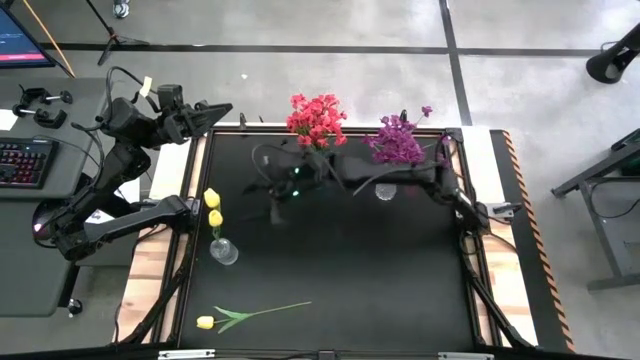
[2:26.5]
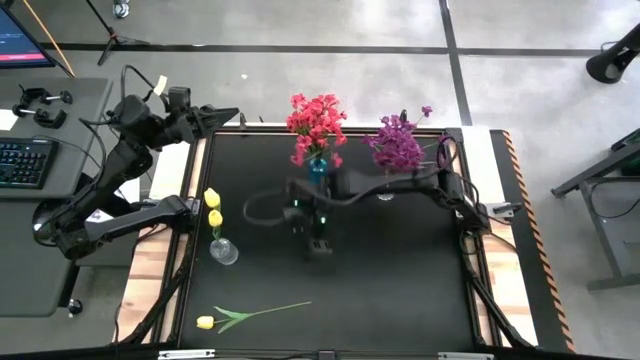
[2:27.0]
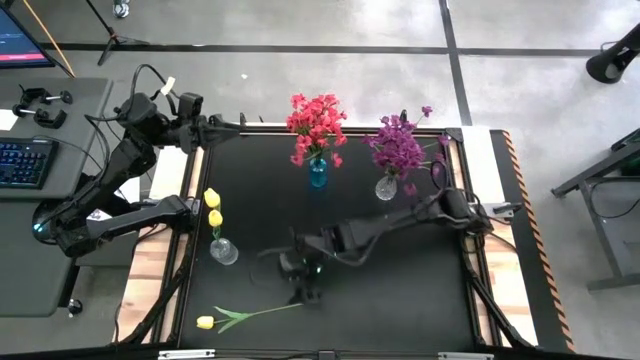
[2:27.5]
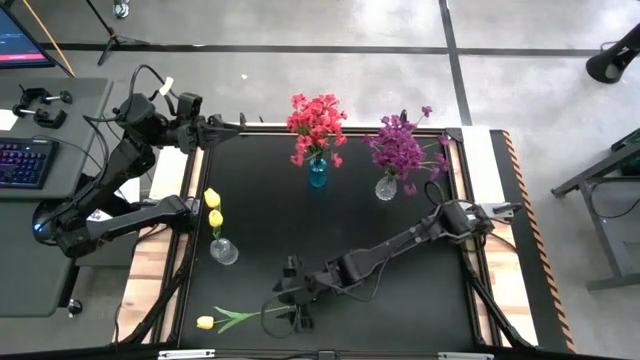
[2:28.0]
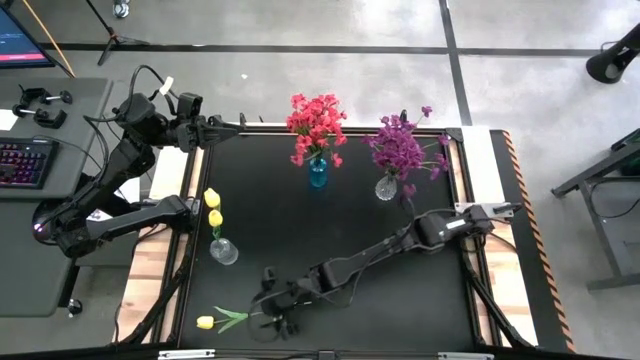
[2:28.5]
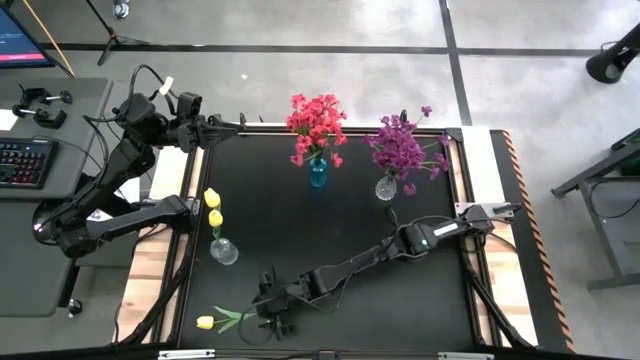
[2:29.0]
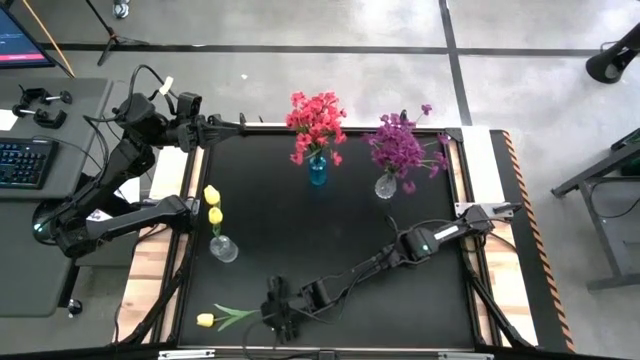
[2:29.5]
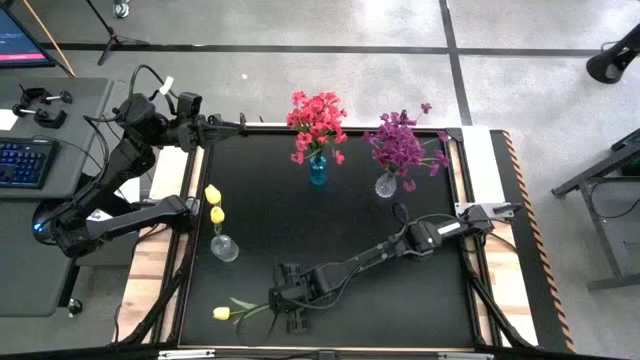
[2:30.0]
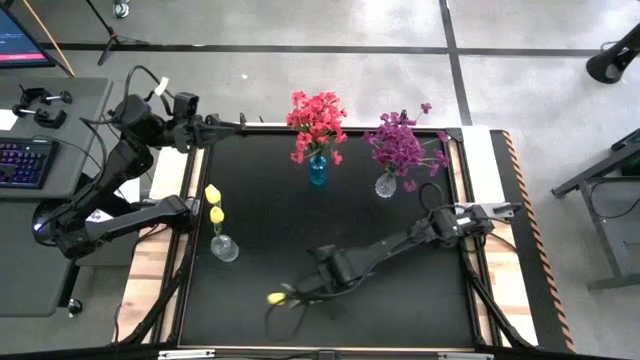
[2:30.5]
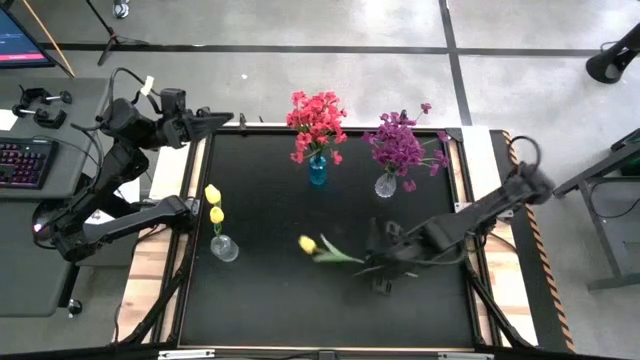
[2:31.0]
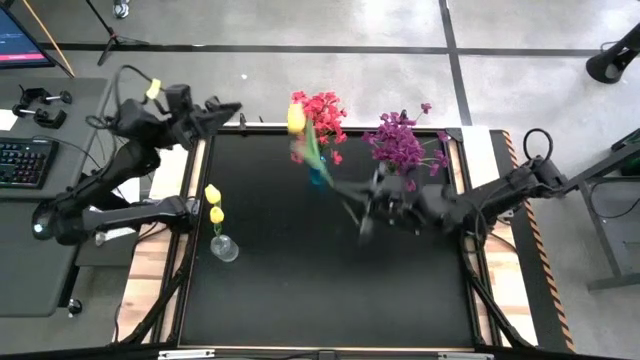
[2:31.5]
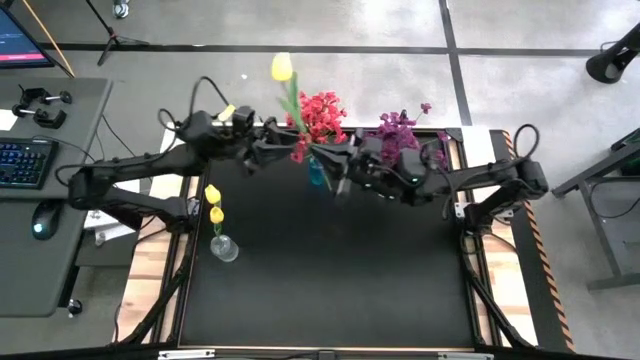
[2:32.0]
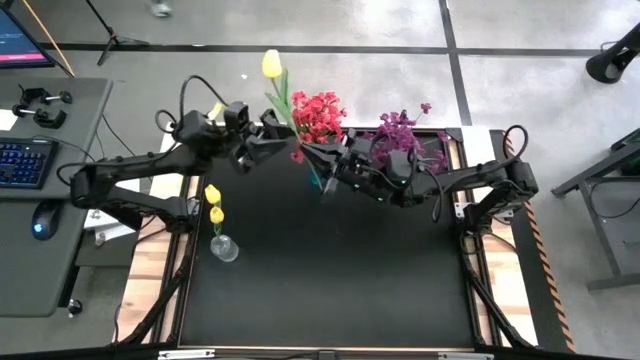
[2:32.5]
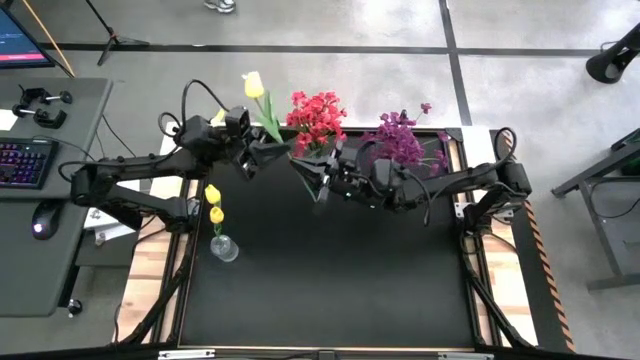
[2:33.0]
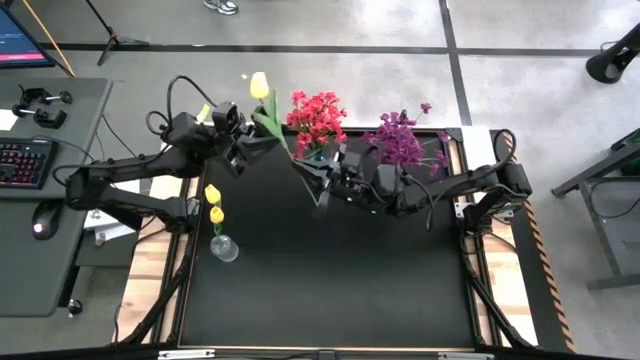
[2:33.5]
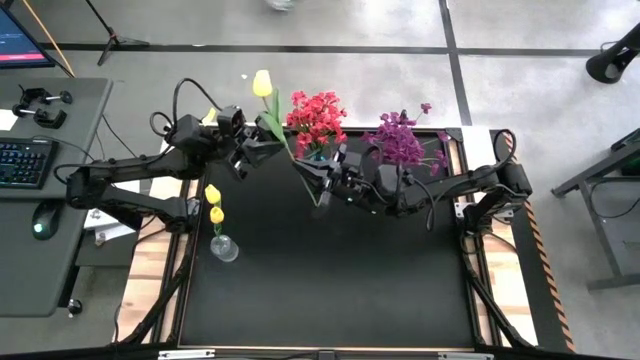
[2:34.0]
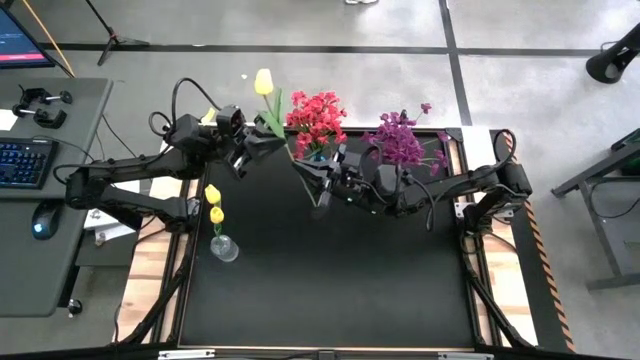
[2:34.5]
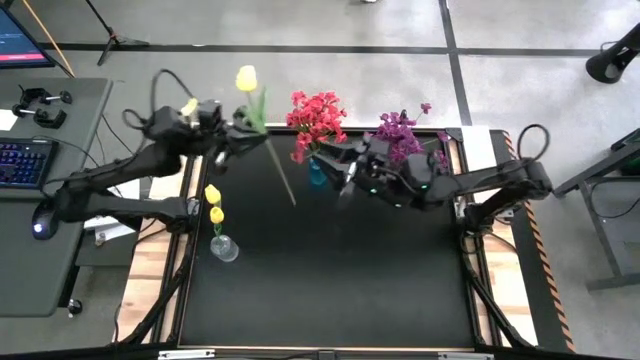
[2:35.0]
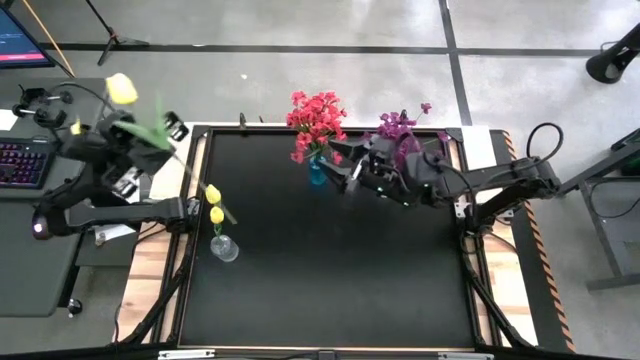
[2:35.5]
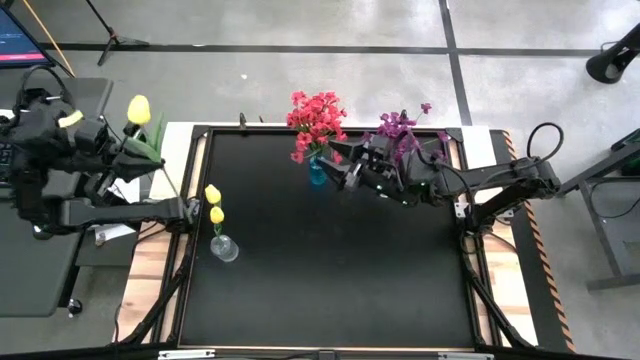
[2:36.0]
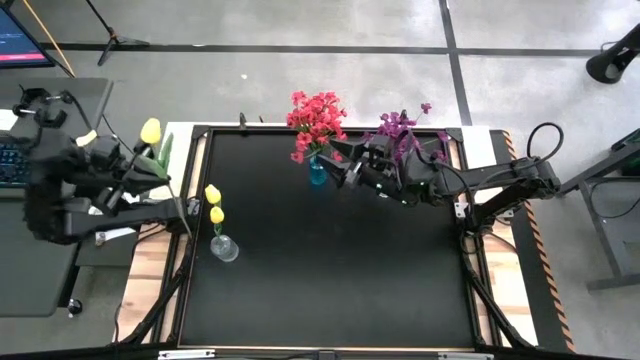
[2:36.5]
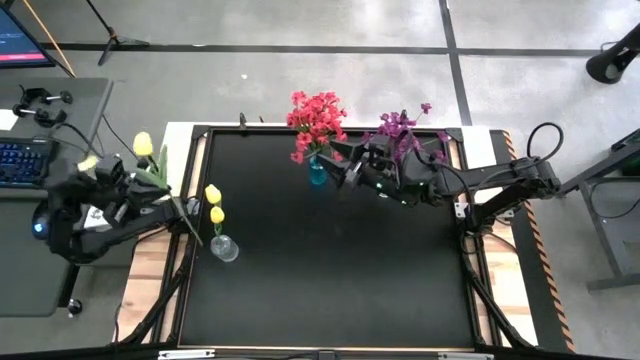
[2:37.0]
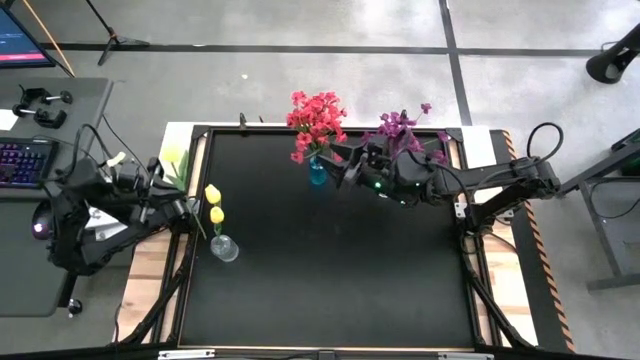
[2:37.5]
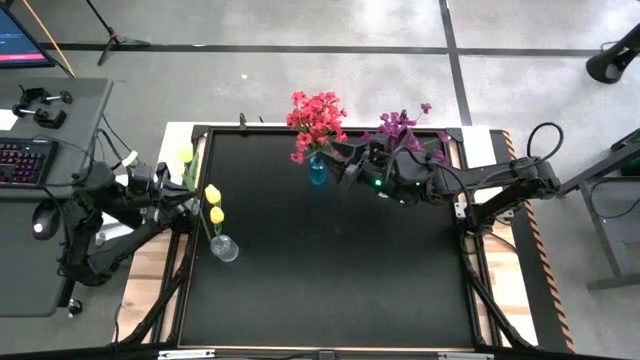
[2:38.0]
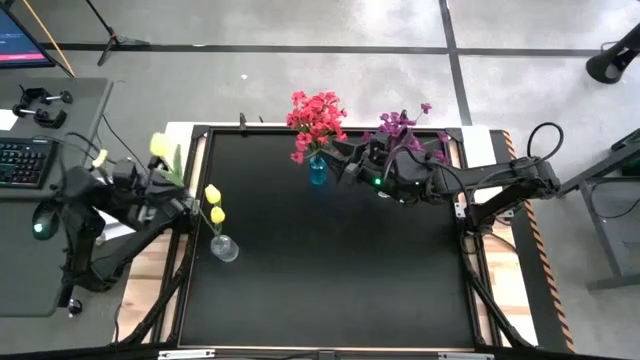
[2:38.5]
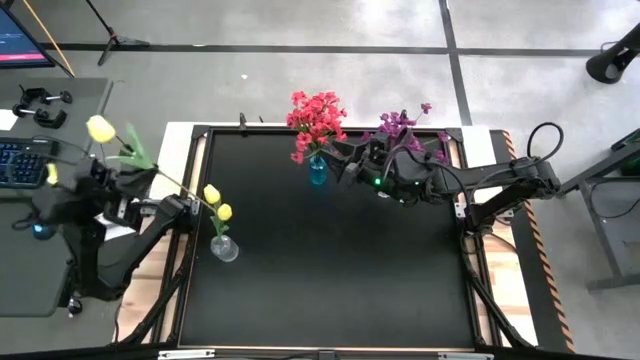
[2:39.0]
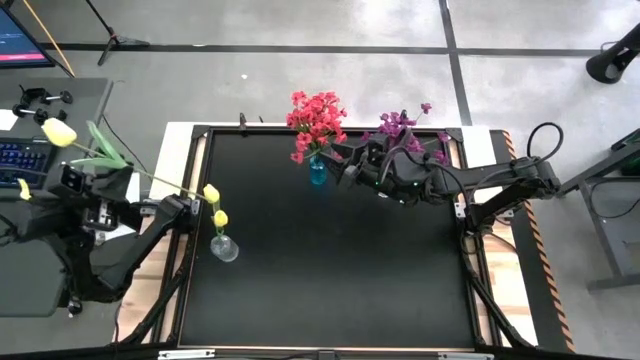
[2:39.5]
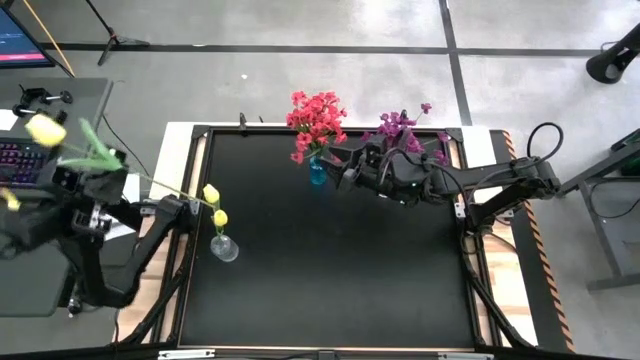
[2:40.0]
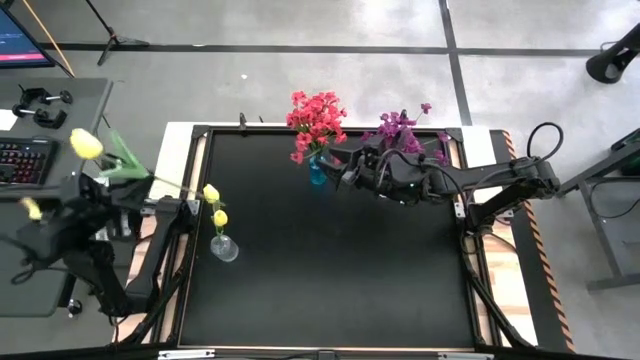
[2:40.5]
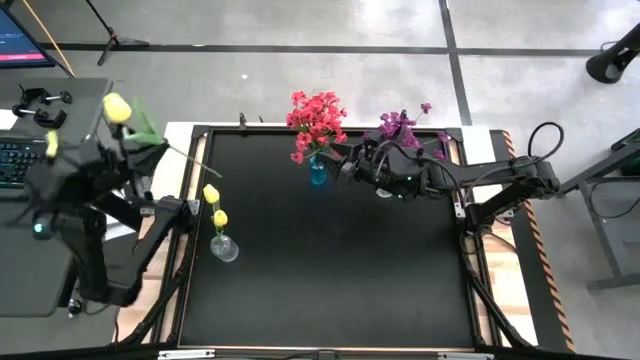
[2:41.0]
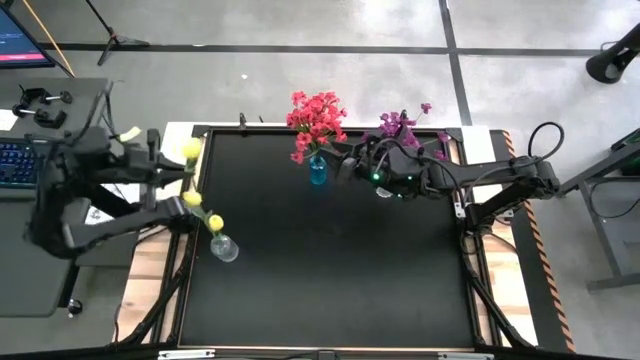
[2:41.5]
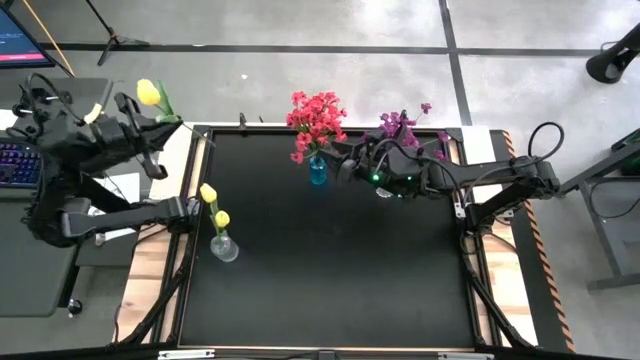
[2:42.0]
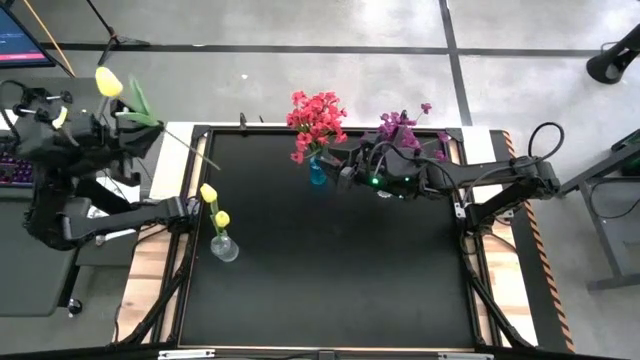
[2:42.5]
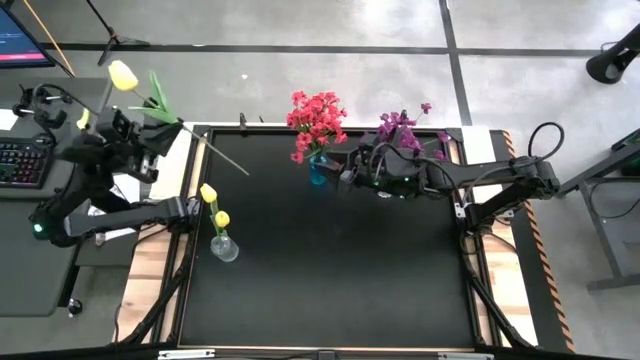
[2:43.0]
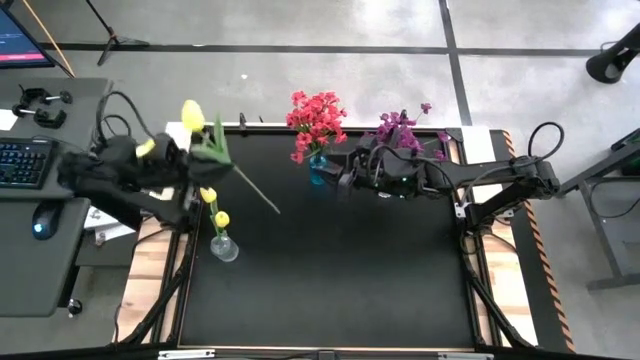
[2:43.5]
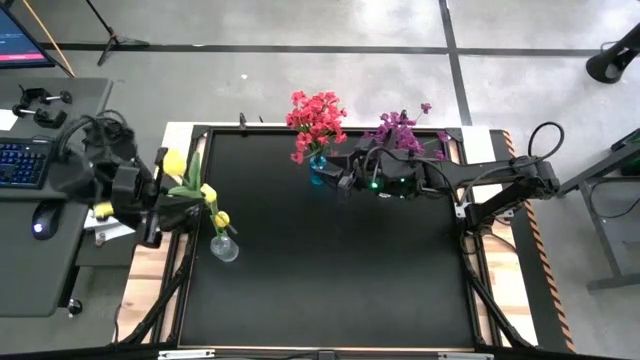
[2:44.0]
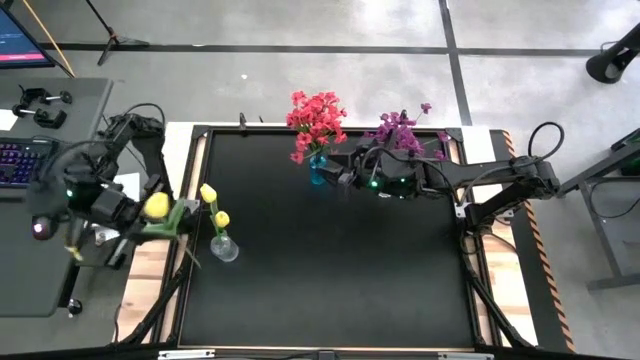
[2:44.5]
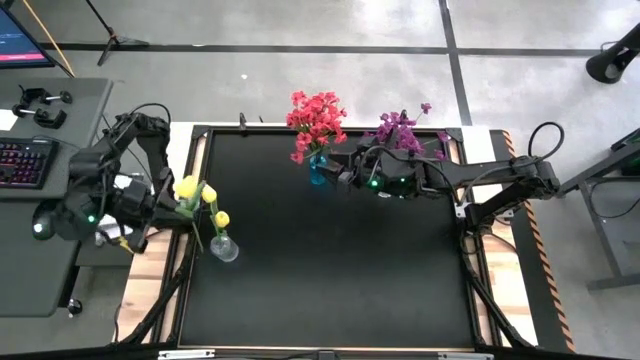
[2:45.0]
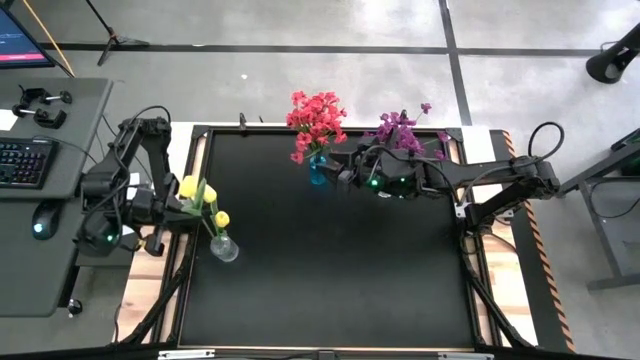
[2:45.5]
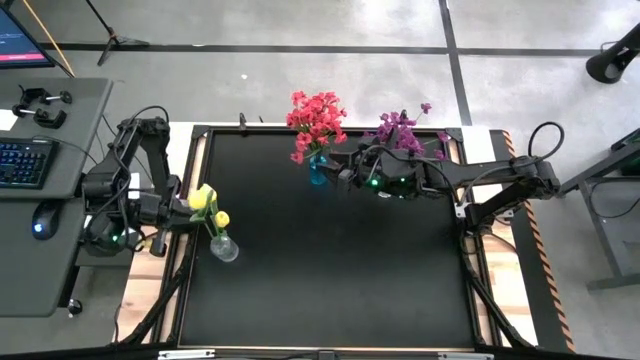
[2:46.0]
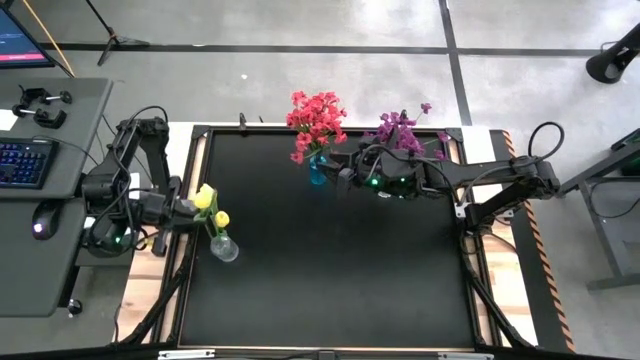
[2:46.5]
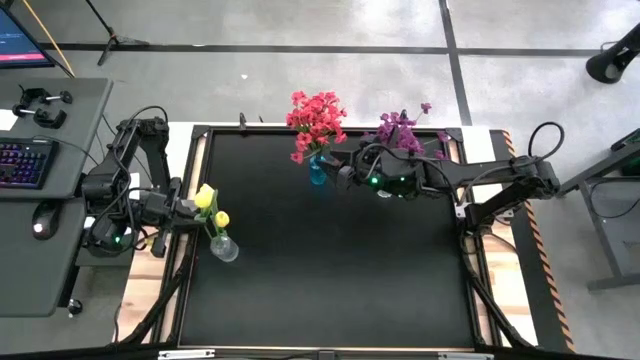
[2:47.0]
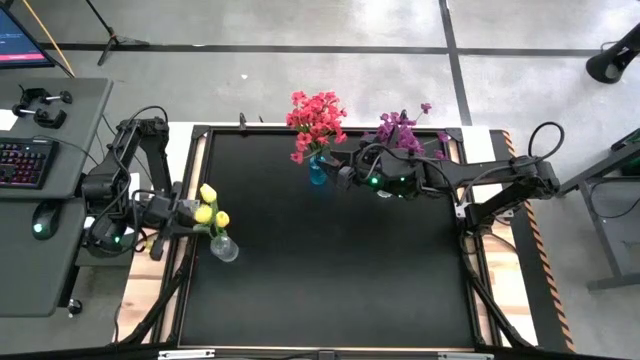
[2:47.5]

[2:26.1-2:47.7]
Task: Sort flowers into vase by color
Put the yellow flower into the bottom transparent vase
